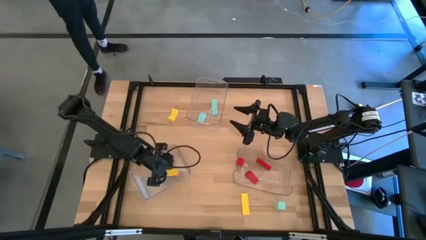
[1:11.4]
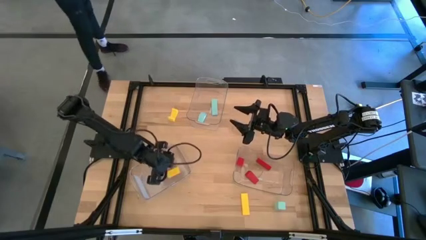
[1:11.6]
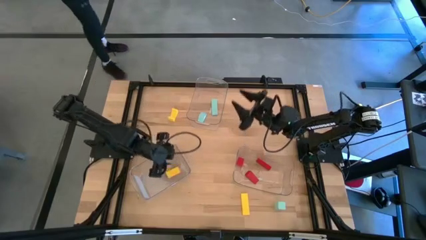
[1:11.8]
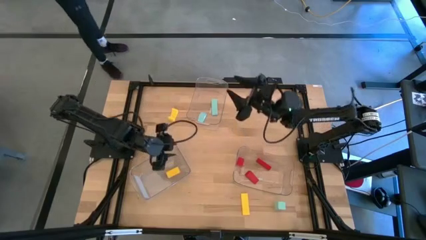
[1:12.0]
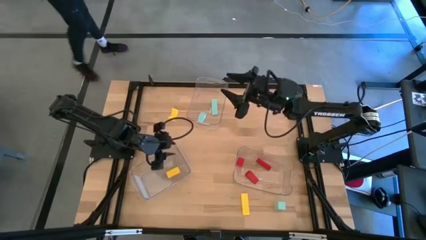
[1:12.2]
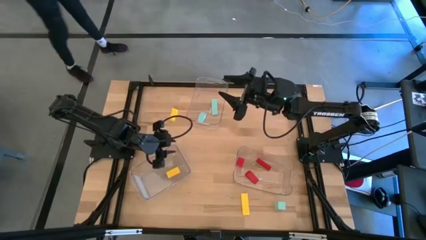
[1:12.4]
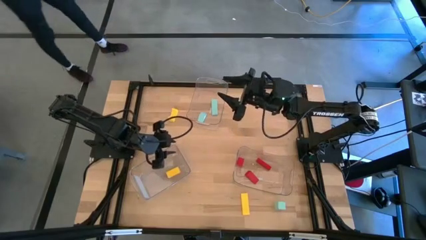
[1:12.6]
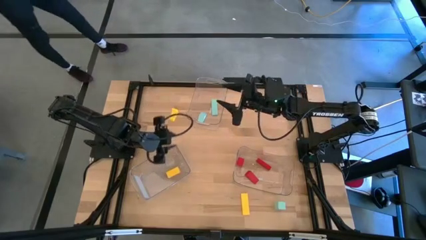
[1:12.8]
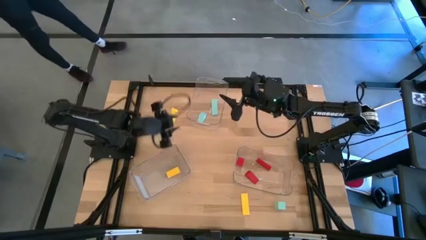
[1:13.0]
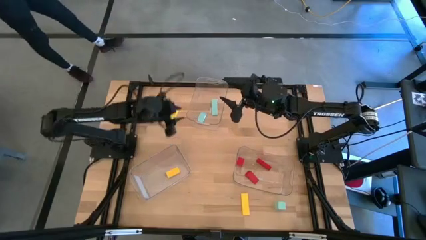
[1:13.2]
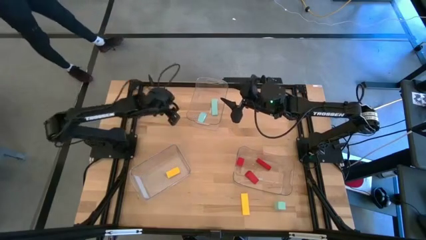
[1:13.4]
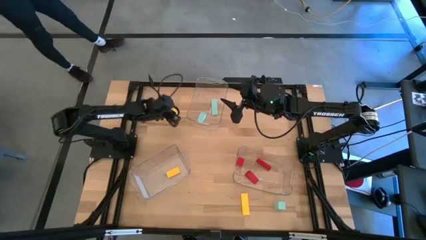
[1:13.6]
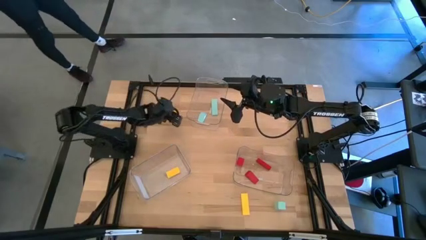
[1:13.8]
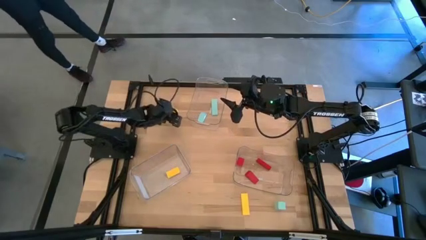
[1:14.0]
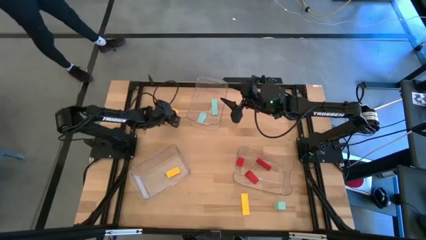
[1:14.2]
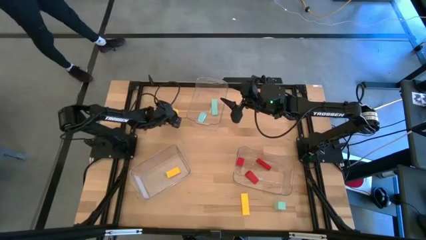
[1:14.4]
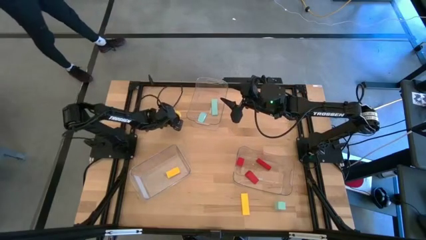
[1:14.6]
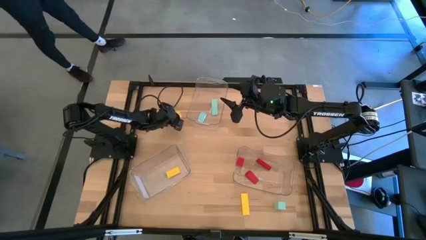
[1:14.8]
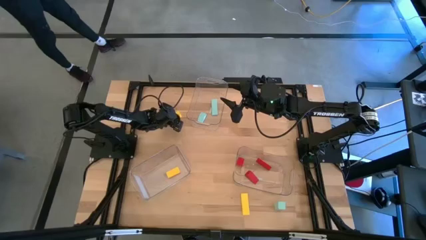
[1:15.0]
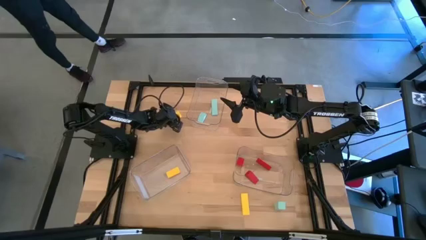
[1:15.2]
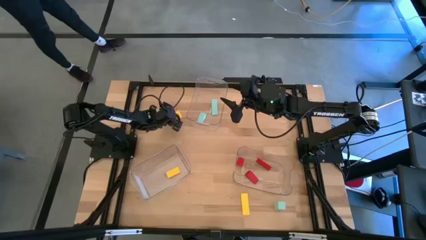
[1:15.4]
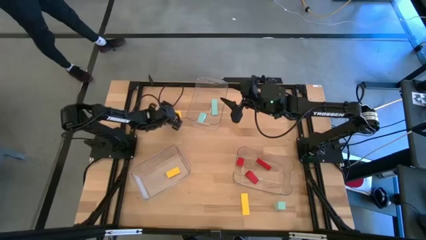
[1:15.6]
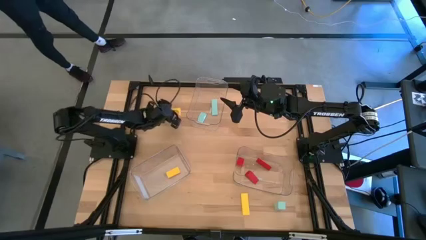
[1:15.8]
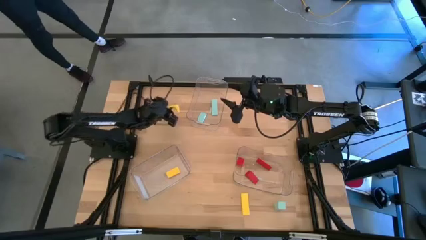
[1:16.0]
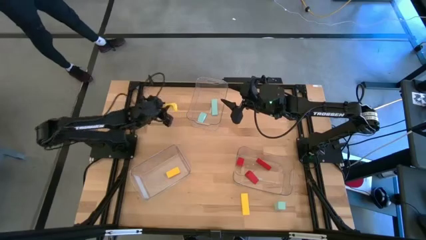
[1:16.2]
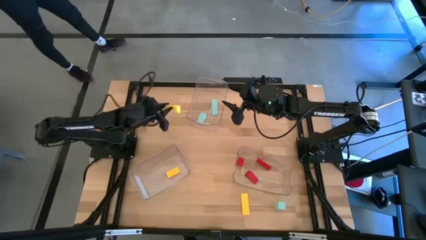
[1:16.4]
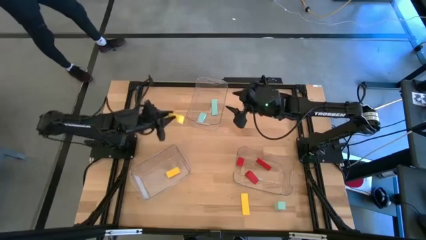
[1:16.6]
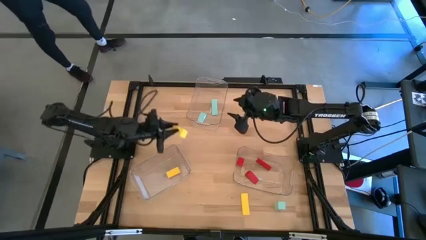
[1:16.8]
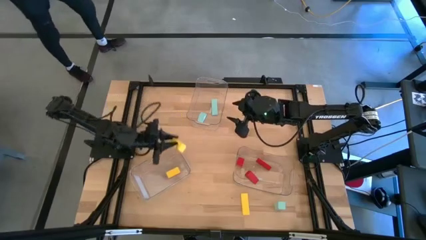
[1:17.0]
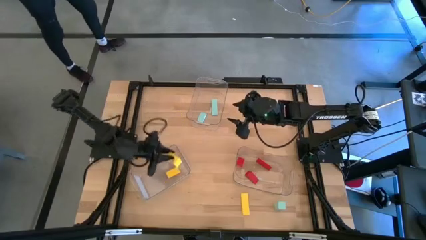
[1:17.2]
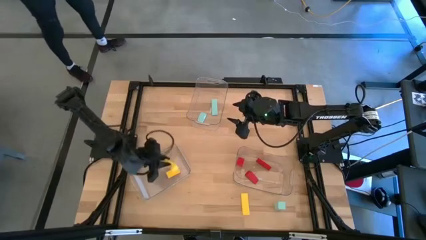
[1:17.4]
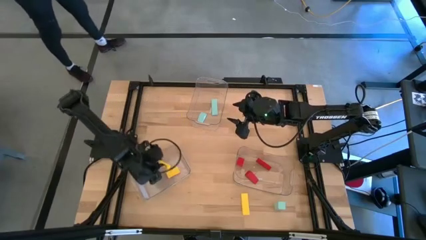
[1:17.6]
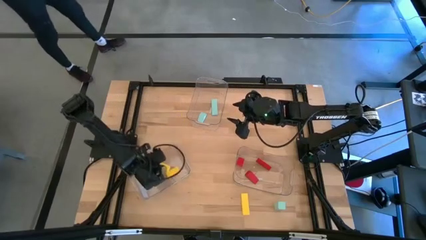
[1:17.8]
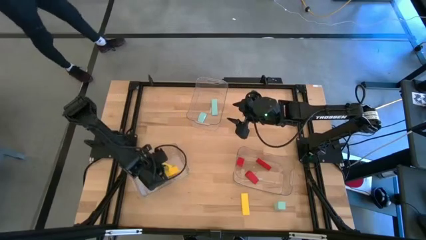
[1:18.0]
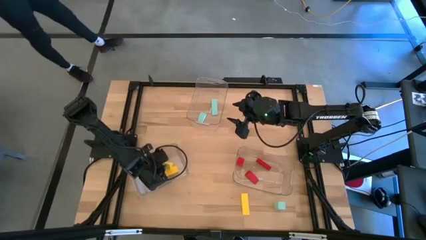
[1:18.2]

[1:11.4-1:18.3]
Task: Sort & place blocks by color
Put the top yellow block into the bottom left transparent bin

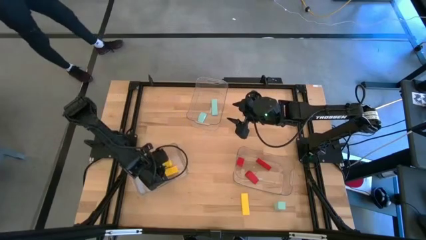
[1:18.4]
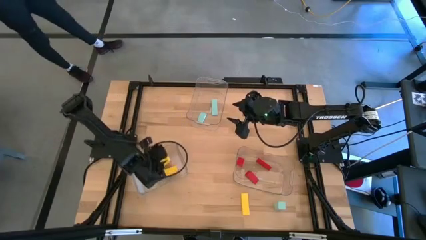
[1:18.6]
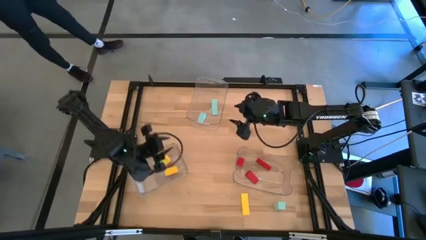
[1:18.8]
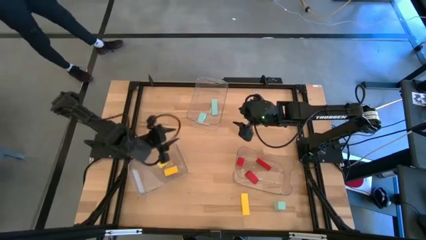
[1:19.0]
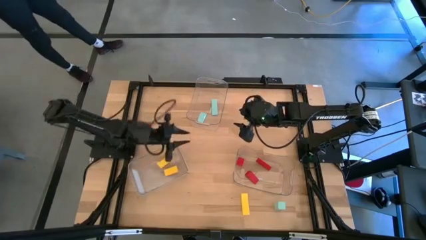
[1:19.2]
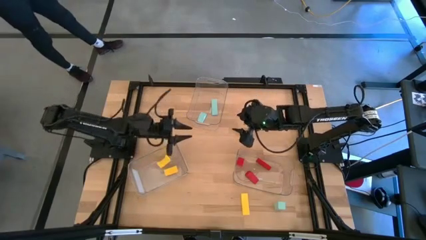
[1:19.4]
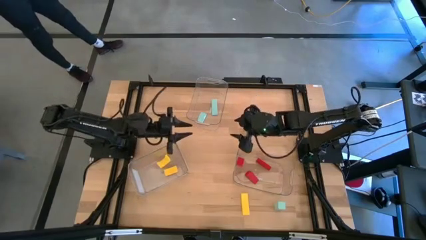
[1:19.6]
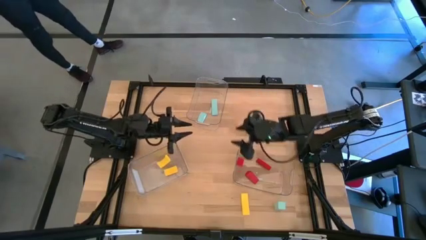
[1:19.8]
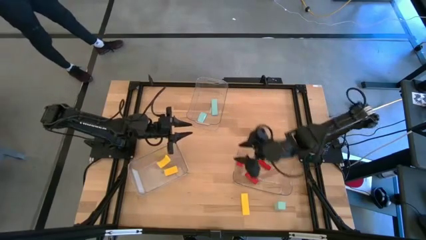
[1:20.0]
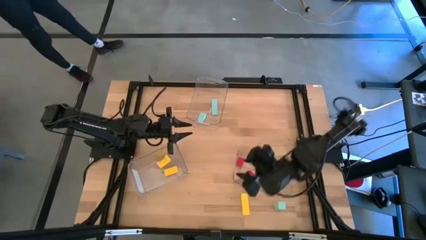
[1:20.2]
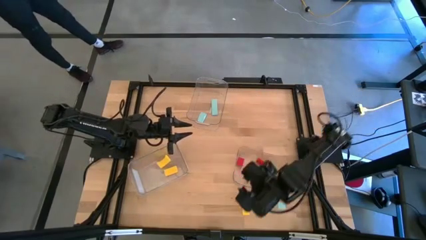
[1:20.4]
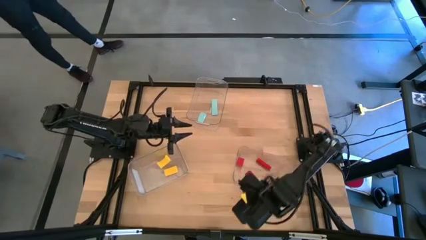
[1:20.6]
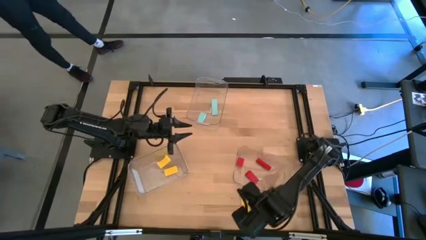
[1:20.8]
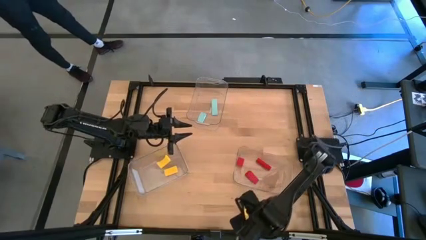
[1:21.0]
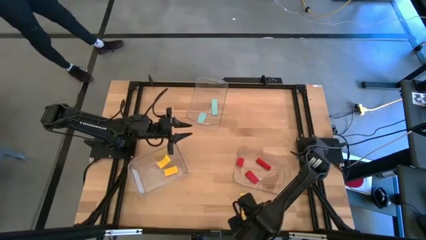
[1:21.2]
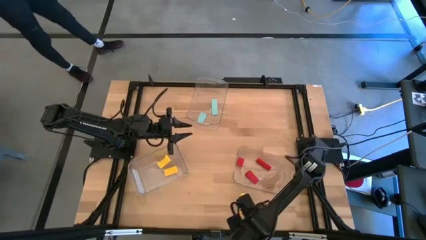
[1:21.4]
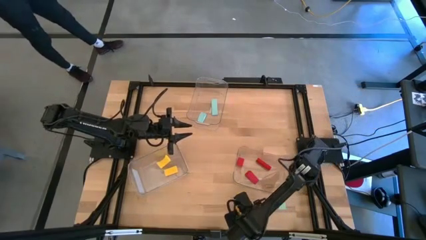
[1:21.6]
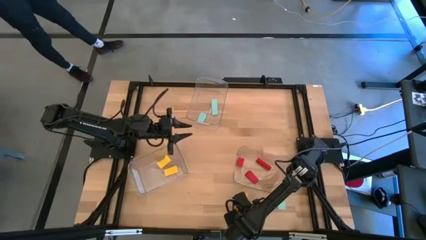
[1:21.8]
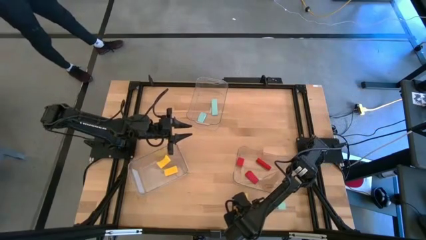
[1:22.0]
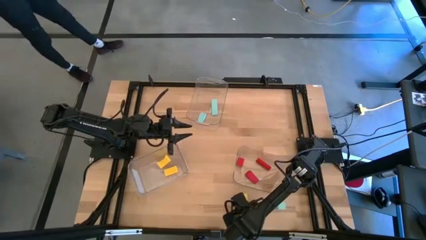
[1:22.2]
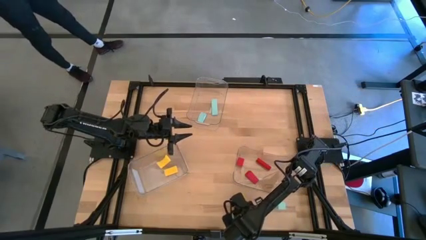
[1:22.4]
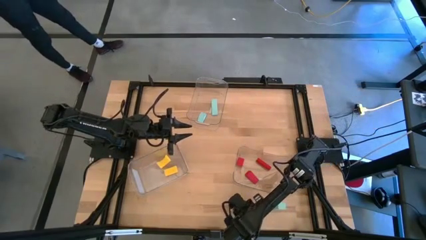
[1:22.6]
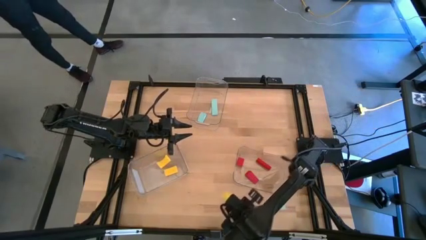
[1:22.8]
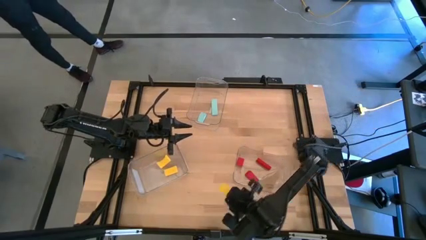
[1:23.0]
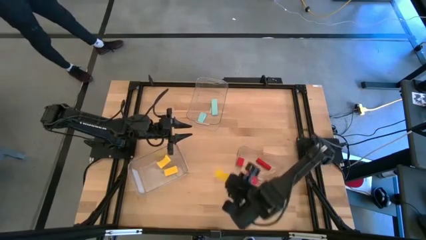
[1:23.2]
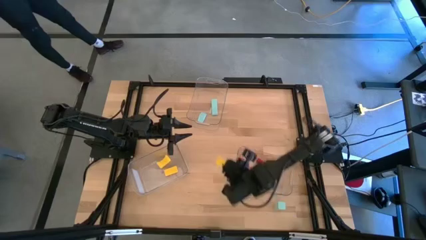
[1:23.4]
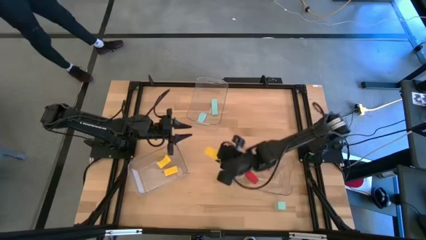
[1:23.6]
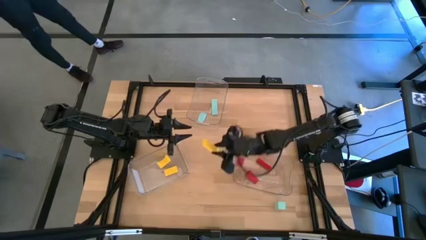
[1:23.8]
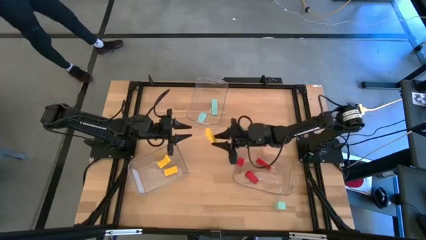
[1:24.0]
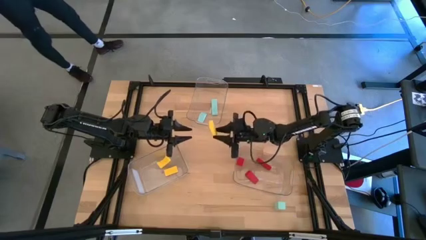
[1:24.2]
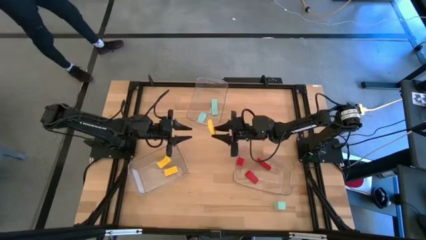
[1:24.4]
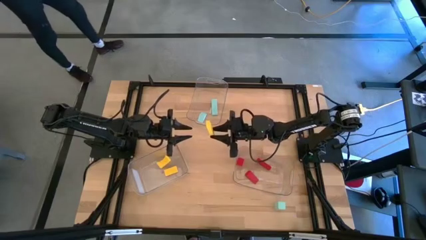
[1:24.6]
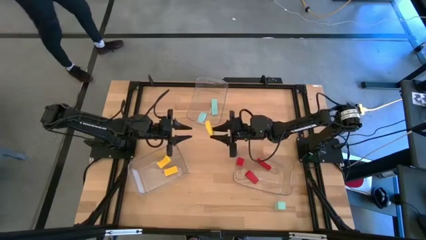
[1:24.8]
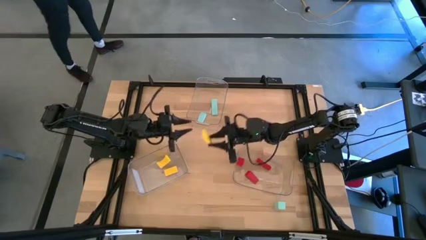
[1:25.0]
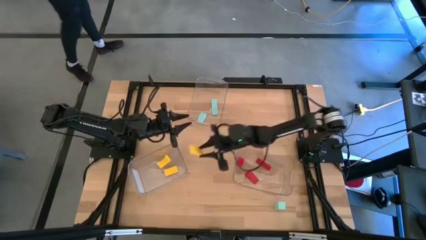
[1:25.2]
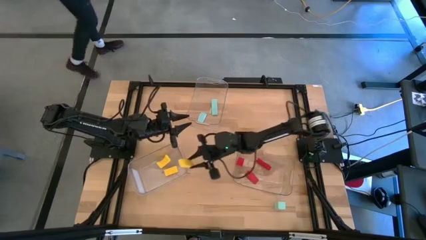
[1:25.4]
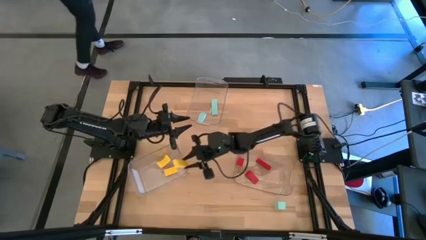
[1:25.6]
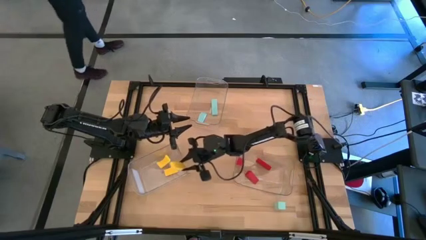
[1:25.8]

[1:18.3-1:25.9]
Put the yellow block into the bottom left transparent bin
